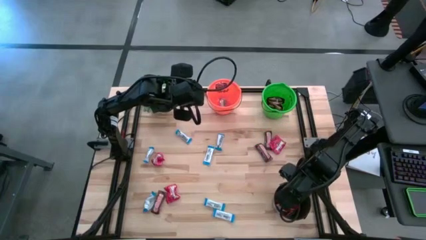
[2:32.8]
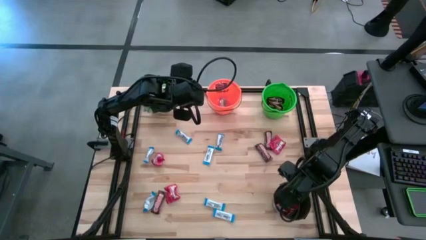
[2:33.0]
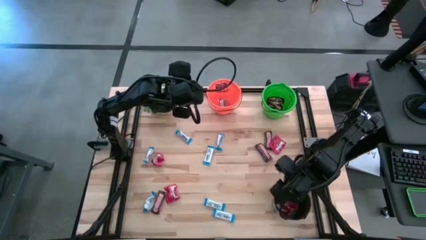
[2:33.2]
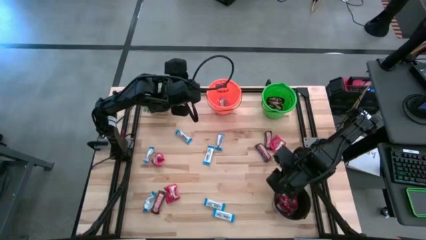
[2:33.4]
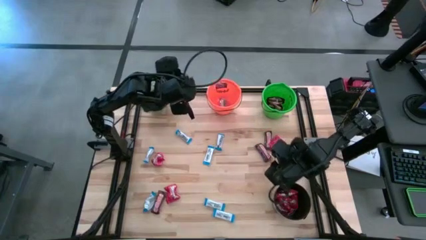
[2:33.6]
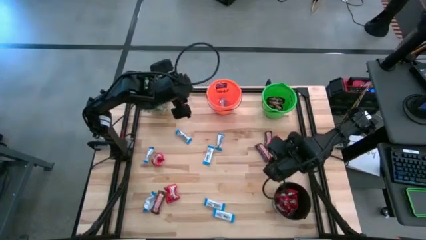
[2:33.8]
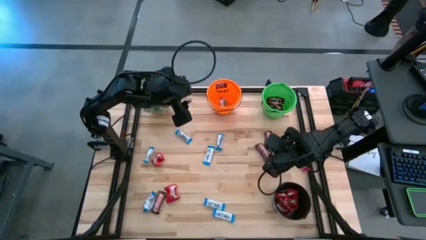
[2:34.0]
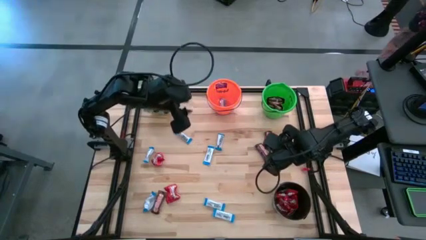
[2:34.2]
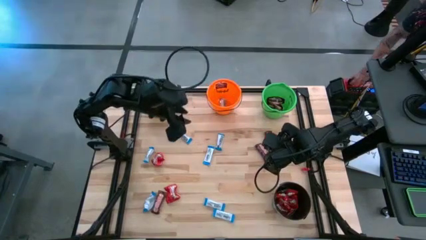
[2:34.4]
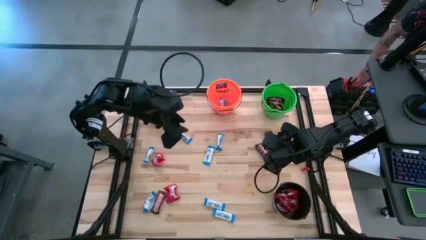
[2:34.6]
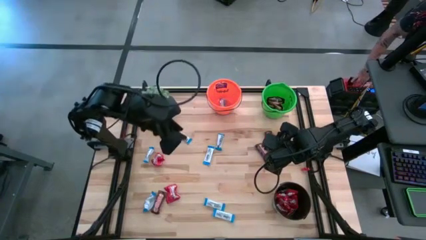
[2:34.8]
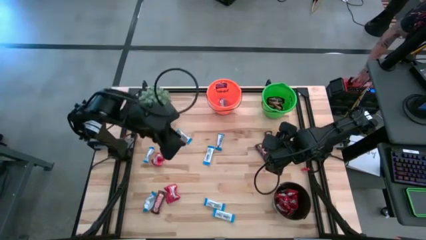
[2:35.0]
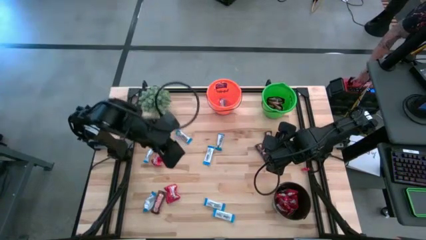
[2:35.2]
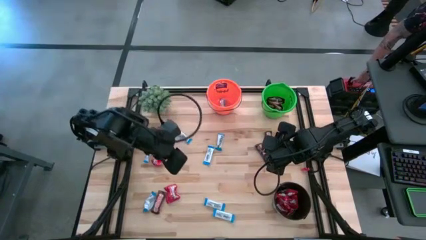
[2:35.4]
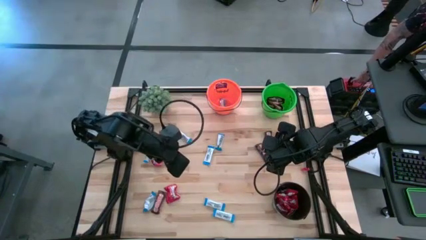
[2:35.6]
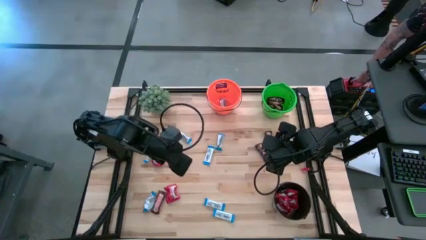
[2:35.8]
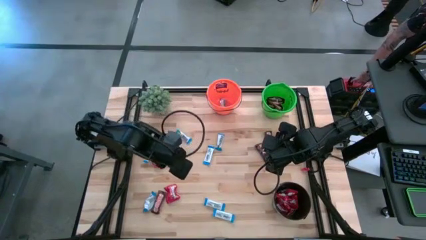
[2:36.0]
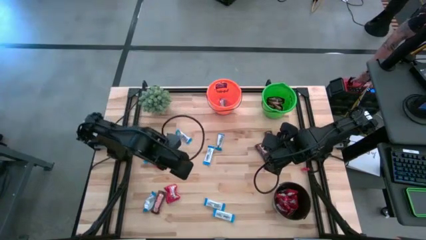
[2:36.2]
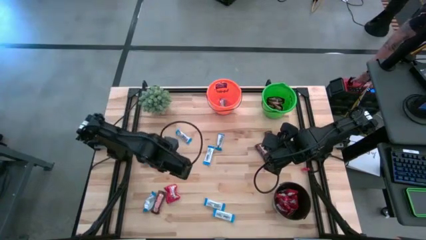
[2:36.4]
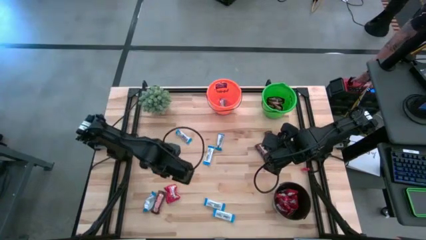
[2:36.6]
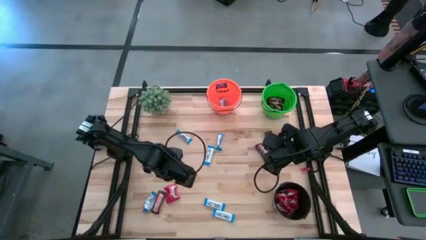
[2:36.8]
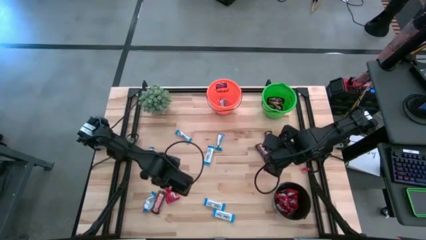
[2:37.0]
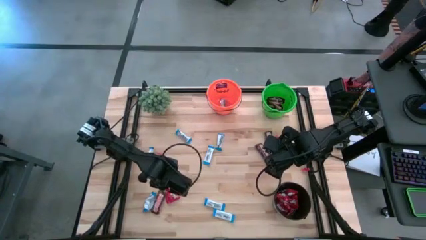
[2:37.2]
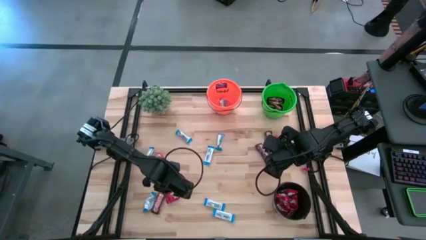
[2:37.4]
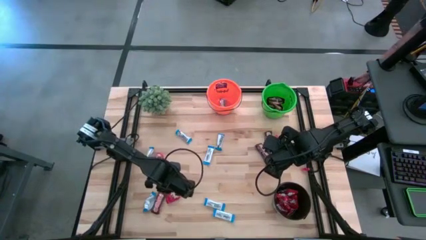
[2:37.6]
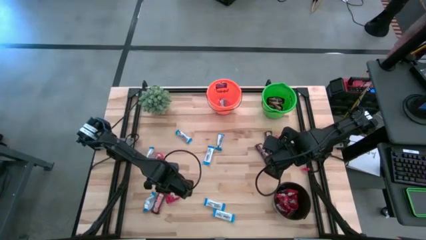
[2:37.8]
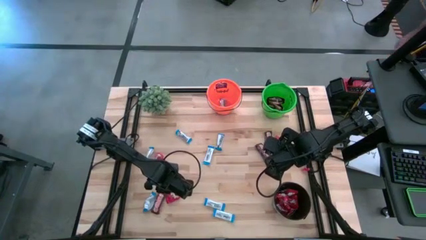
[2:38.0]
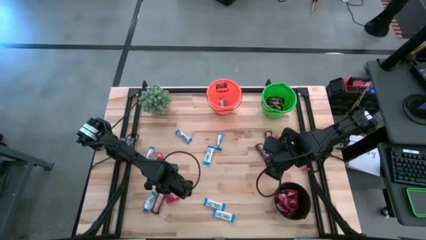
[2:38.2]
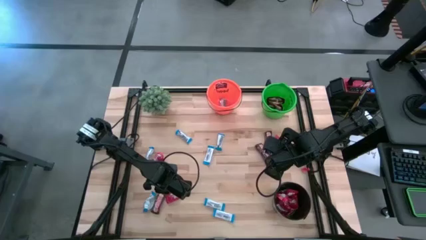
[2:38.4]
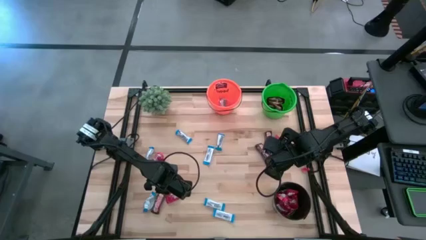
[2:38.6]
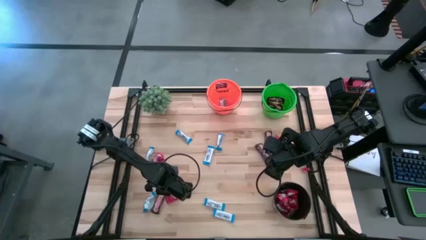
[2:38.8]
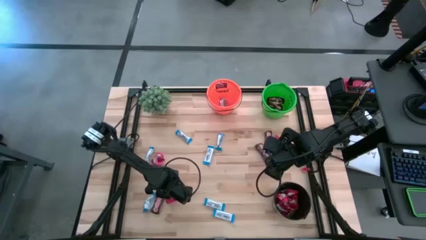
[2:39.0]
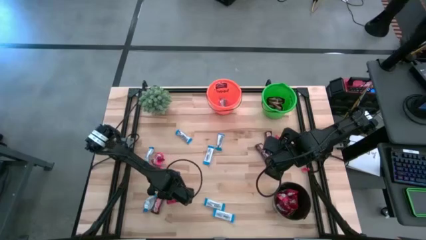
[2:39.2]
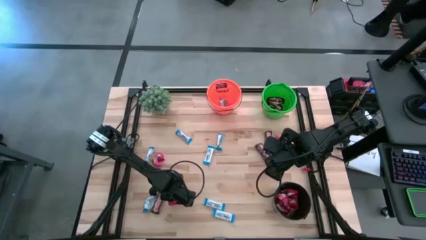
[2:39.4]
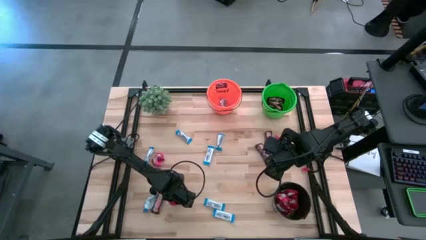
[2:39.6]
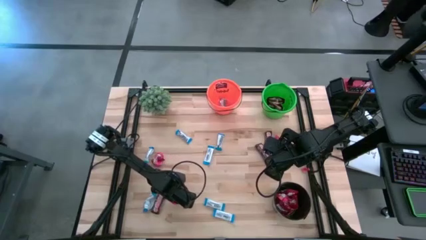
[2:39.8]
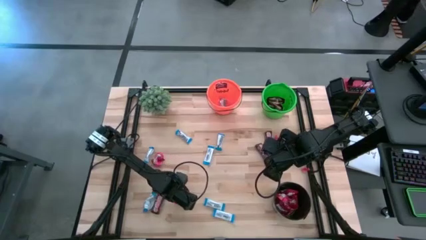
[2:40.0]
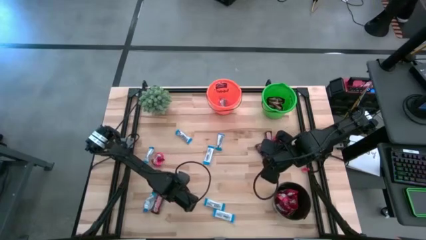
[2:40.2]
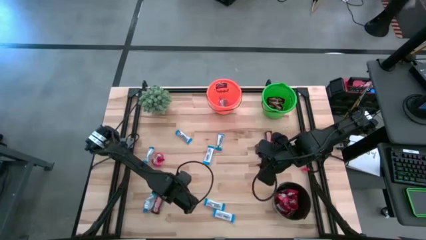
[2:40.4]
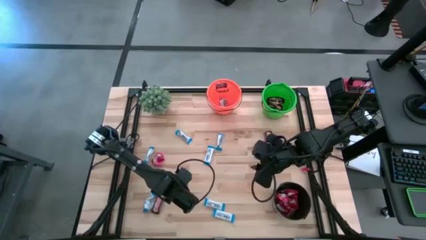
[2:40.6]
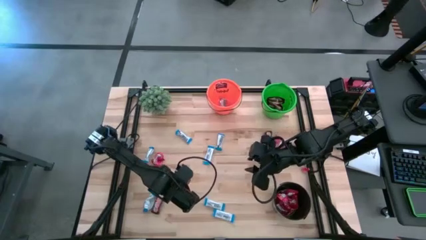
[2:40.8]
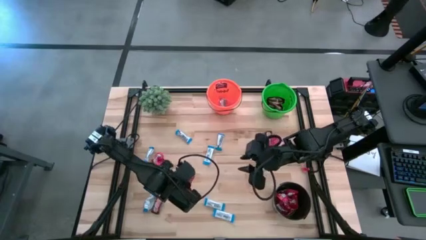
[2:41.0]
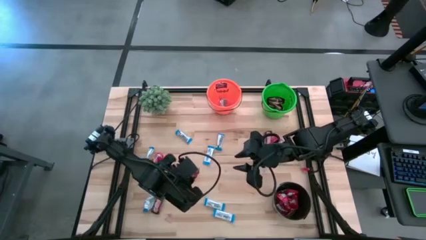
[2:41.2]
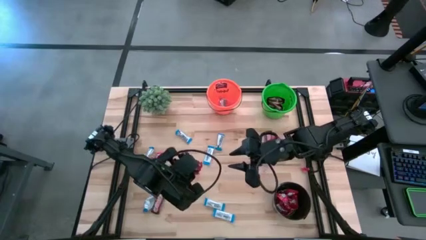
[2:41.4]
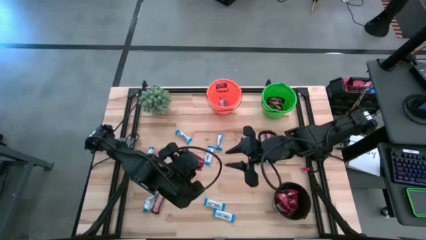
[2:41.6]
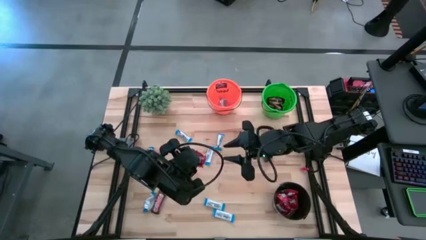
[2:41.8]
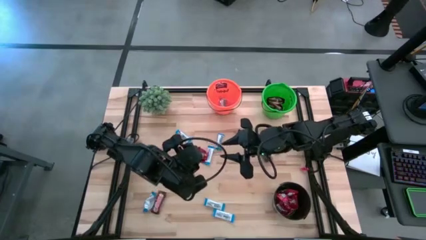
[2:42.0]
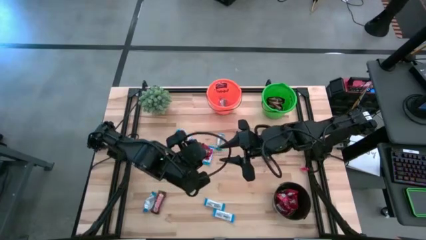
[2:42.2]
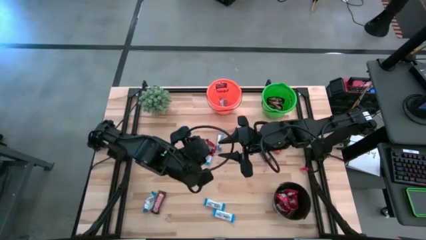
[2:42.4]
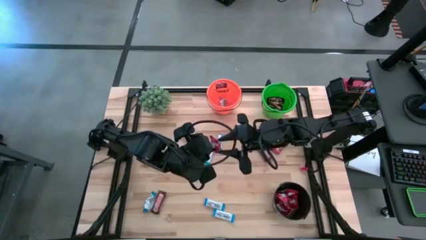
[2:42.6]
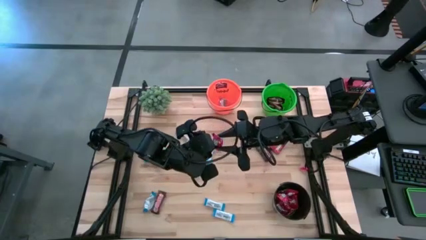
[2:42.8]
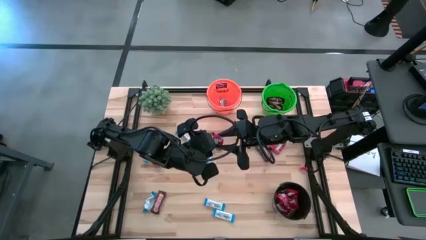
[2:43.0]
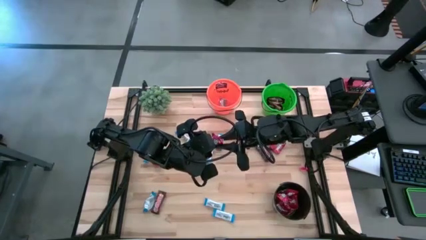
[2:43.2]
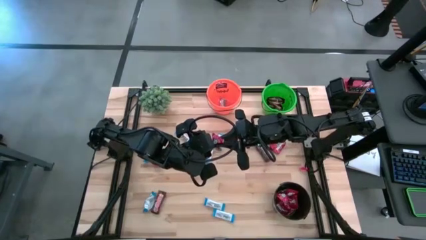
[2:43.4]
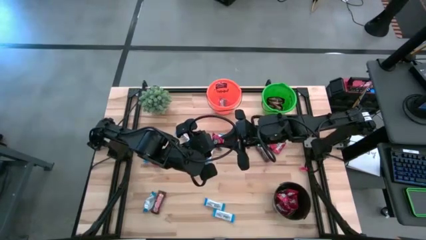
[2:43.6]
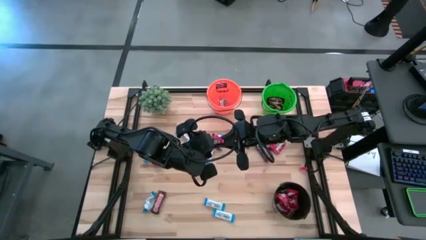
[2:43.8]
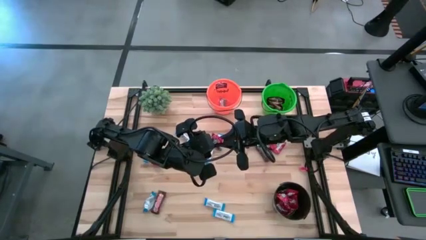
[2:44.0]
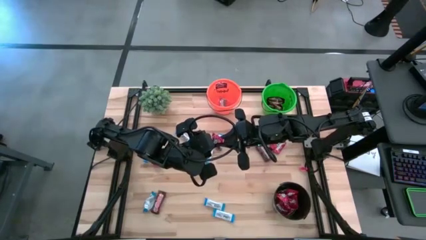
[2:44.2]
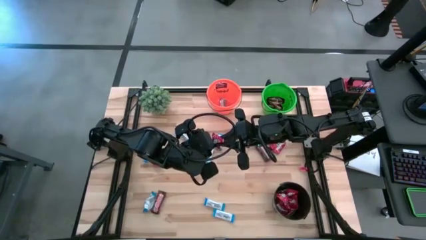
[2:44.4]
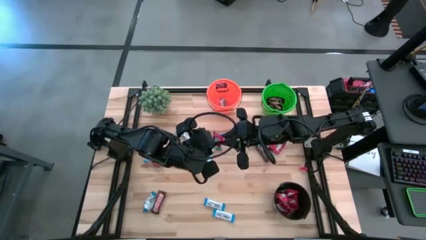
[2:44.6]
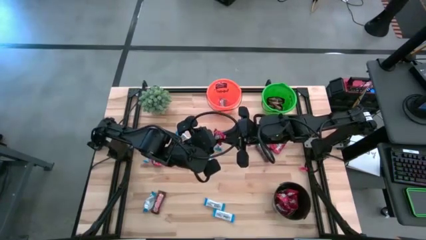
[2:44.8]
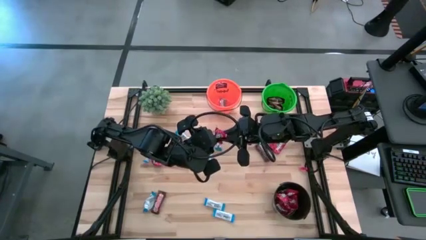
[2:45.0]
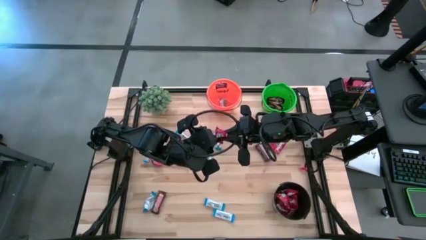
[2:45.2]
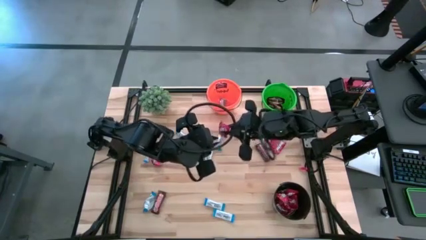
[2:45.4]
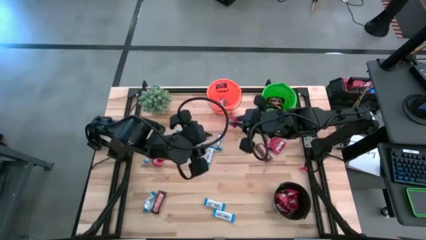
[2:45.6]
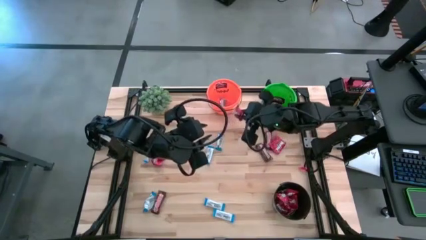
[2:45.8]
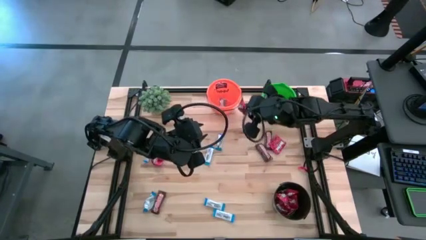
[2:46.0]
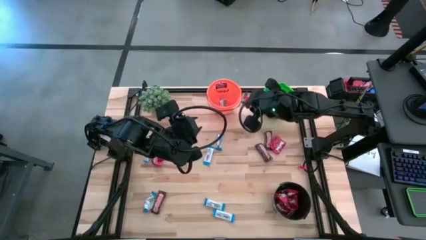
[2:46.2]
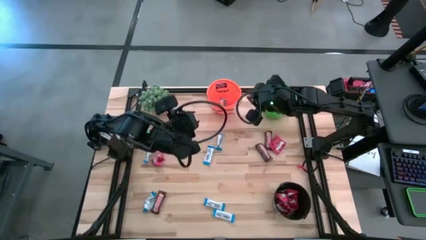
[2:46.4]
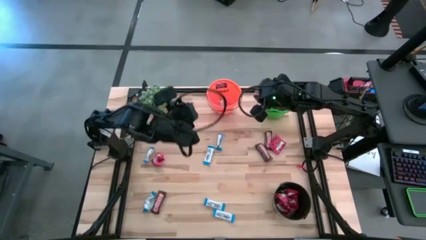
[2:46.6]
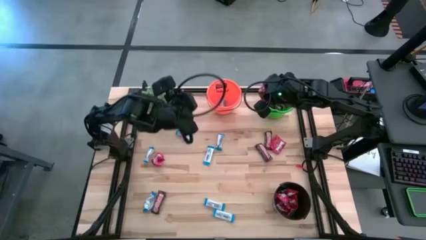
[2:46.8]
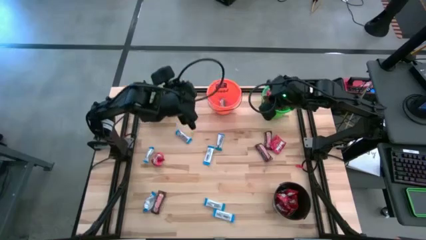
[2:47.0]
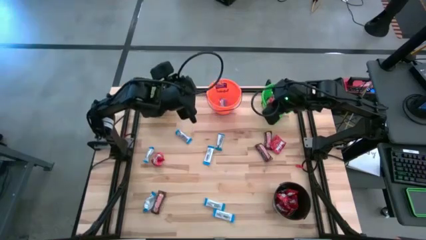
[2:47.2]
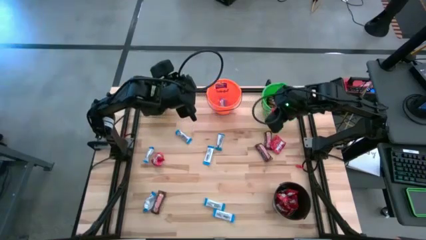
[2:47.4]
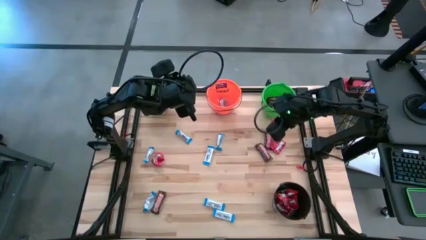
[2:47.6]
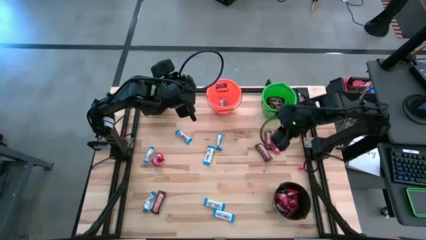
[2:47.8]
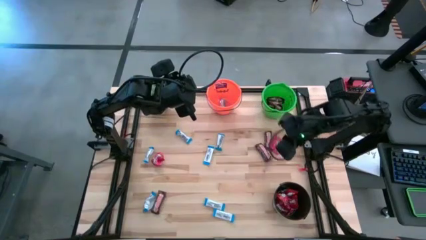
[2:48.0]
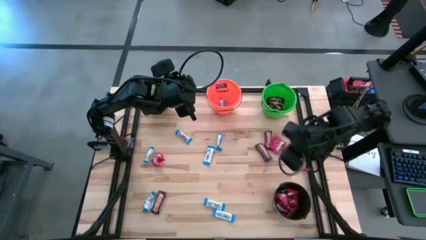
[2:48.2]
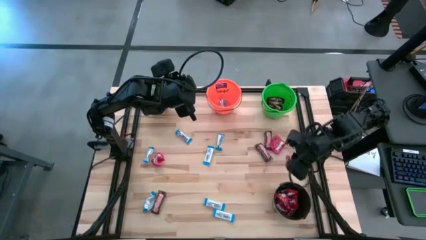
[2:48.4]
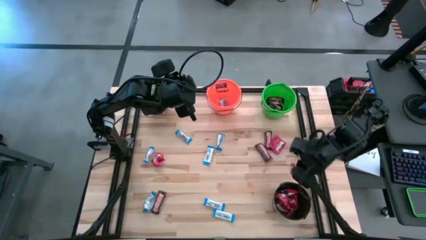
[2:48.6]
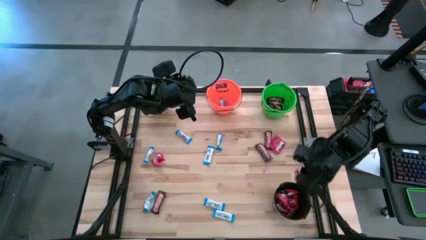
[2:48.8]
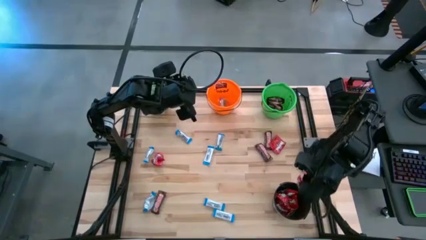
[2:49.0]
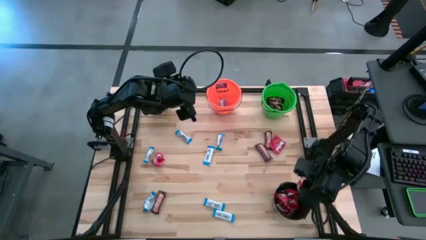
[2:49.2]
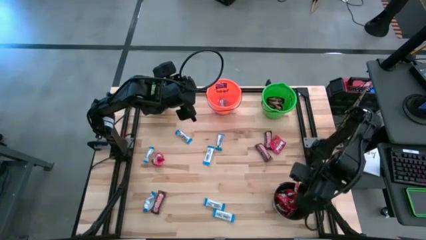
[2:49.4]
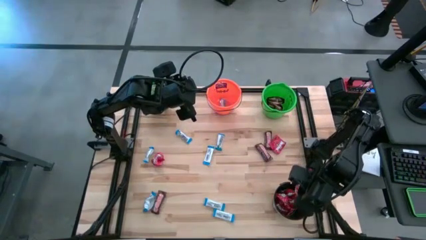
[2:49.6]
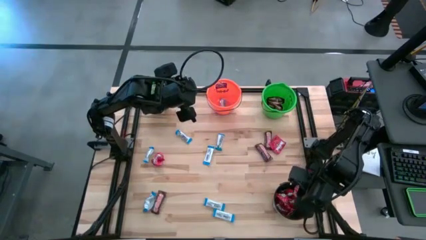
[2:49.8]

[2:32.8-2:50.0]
Task: Organize candy in baskets
Put the red chocolate into the black bucket
